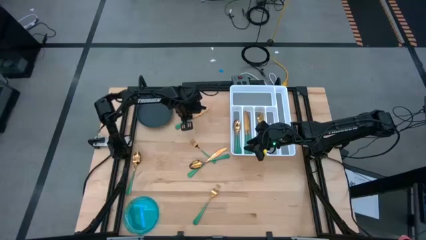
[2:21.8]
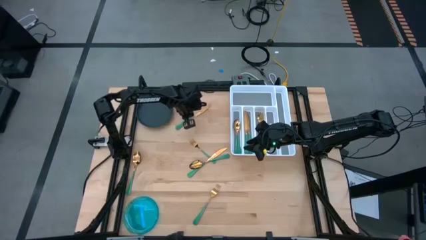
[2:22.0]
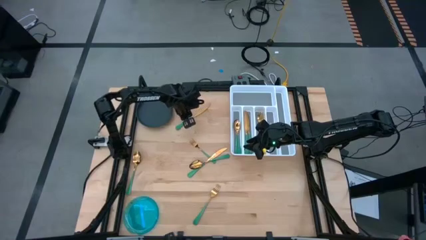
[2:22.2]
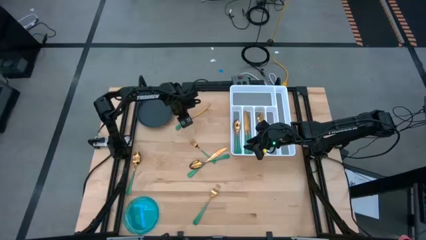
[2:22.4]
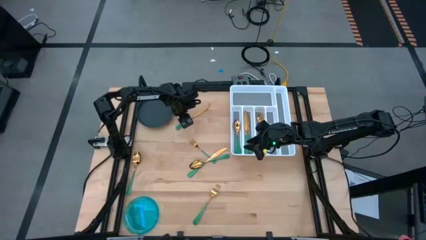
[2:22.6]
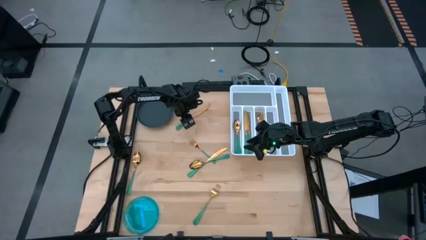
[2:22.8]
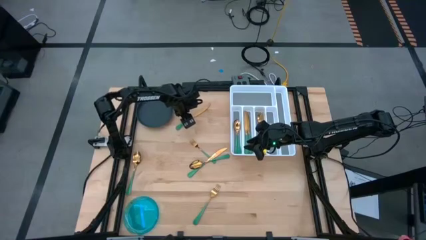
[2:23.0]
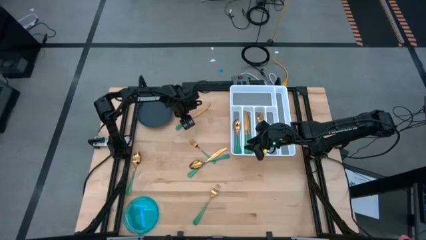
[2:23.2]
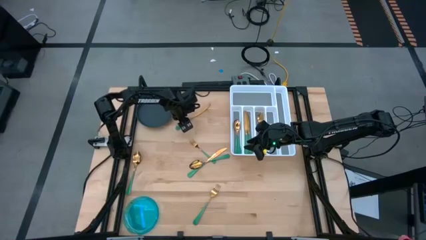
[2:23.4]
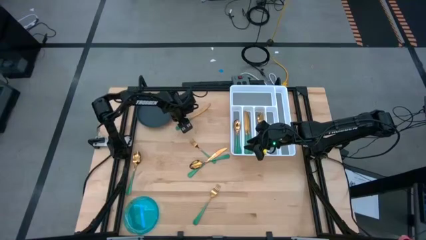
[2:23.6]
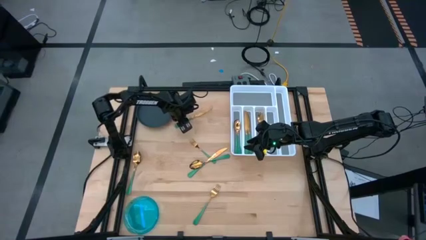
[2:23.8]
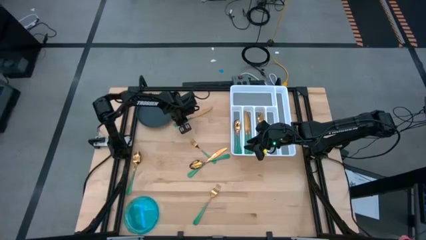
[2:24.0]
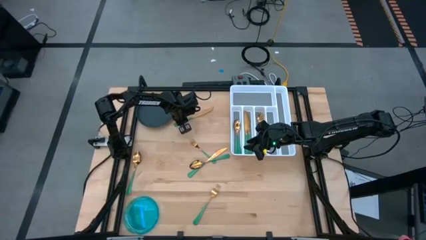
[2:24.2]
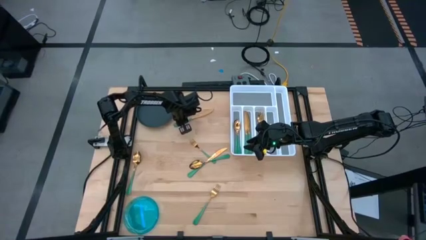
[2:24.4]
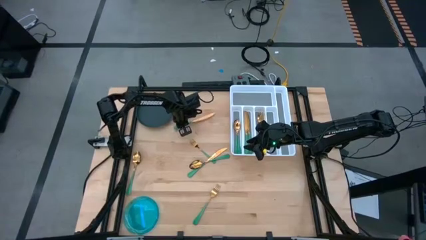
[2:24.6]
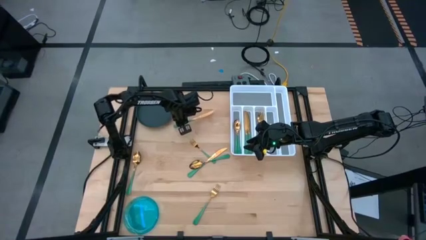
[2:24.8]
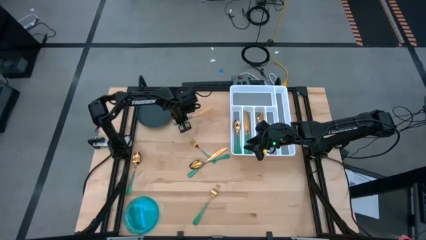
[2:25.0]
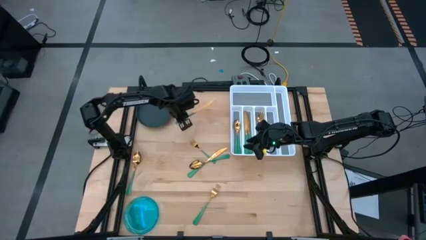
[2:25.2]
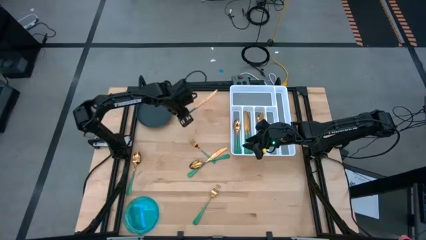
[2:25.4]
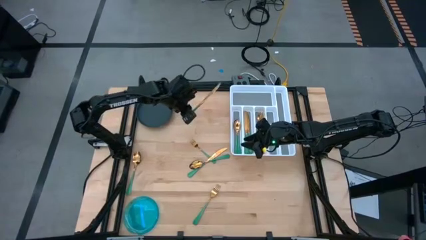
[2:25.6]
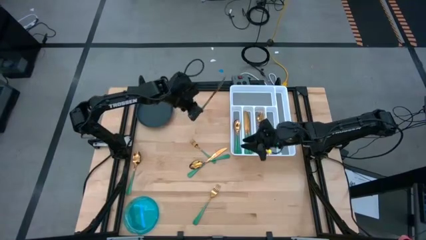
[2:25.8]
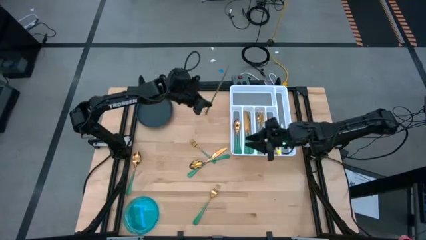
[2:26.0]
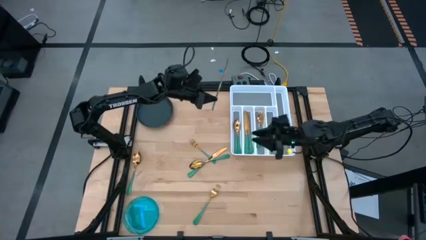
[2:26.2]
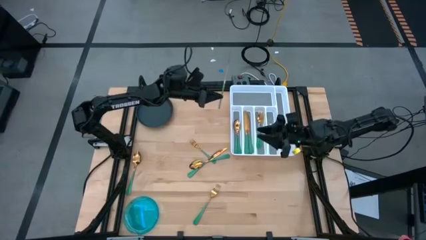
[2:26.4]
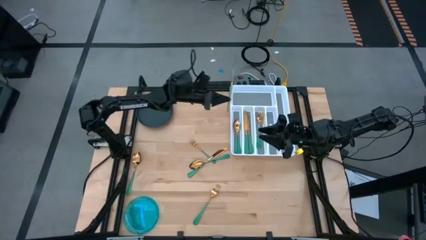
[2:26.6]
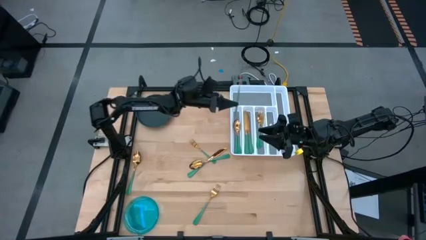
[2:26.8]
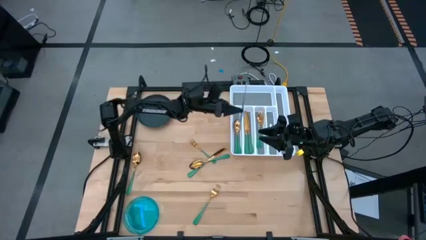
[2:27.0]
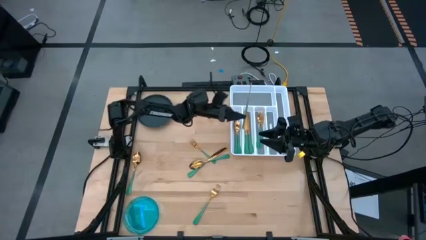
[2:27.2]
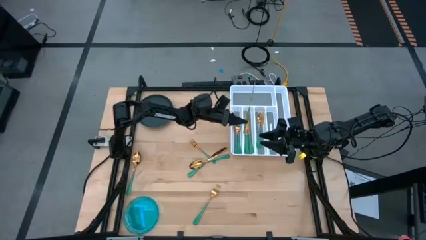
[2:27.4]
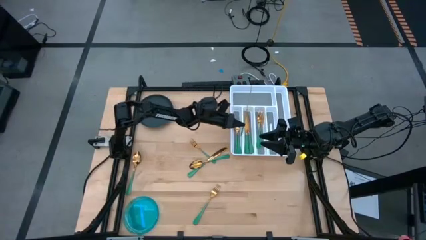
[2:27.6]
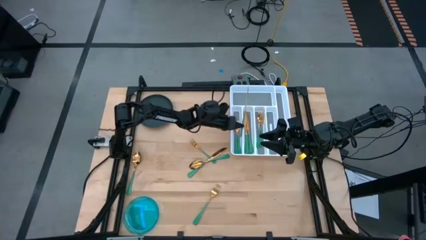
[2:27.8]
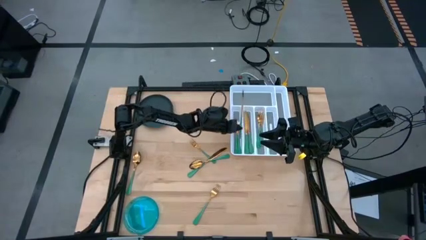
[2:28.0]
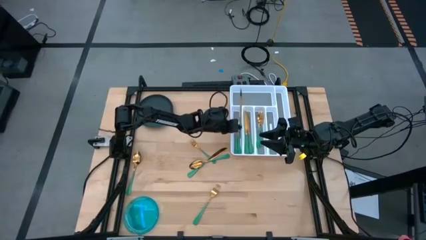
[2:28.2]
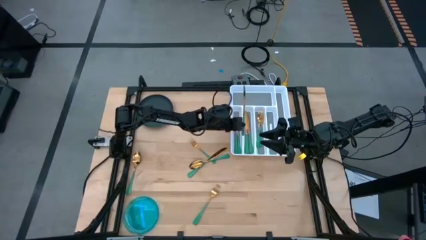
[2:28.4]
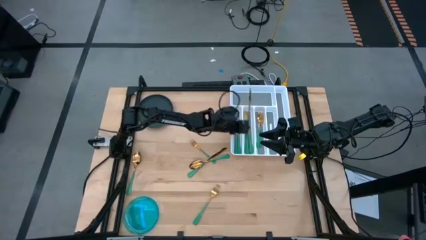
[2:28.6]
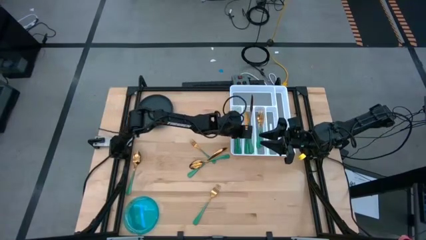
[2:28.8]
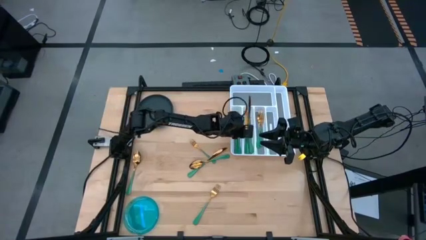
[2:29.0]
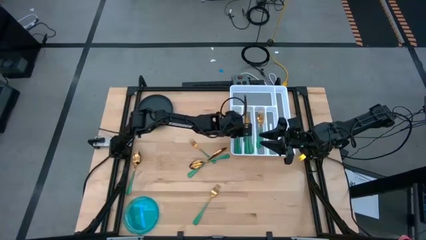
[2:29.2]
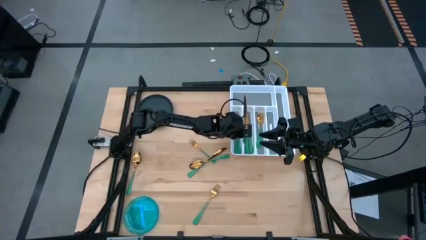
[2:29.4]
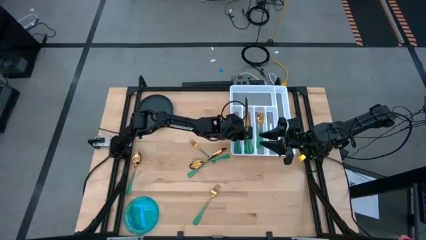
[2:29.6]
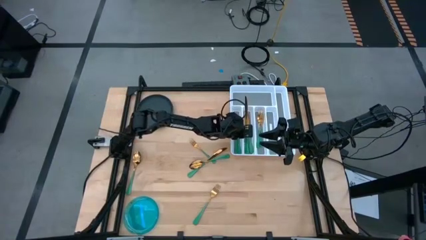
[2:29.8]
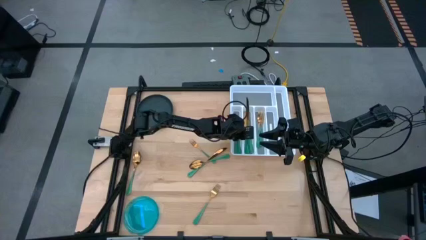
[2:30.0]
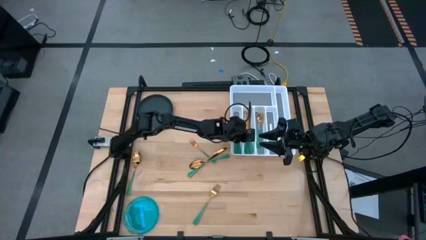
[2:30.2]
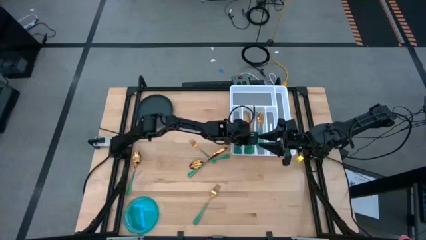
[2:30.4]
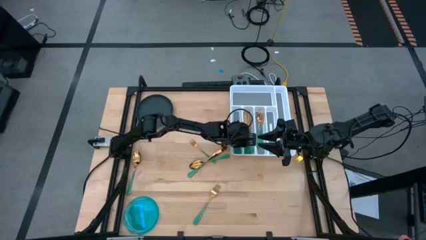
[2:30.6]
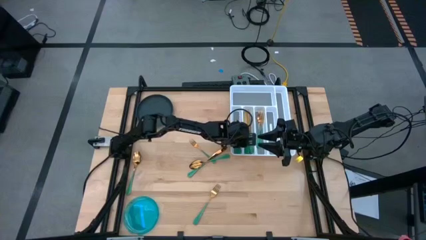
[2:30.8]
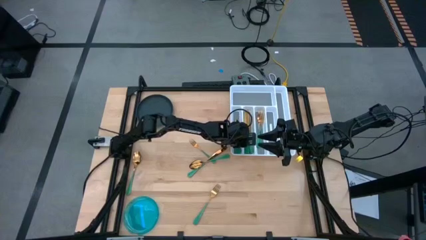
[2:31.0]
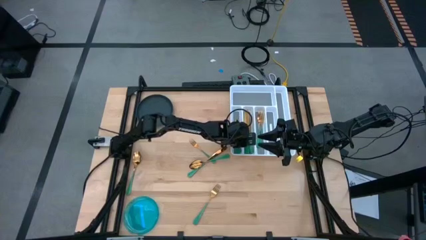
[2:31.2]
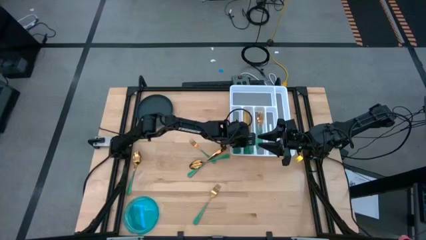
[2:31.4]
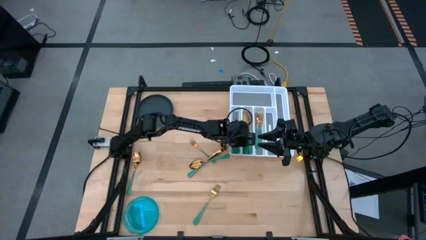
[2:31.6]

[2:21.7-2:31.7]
Task: Sort silverware
Put the green knife on the silverware organizer

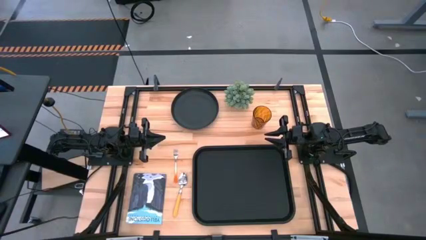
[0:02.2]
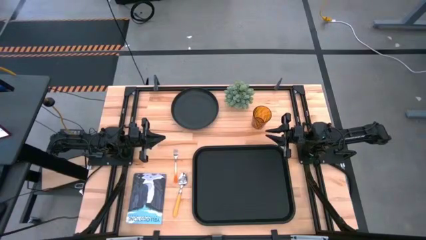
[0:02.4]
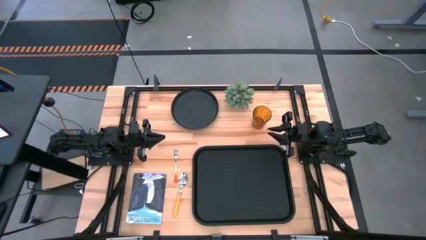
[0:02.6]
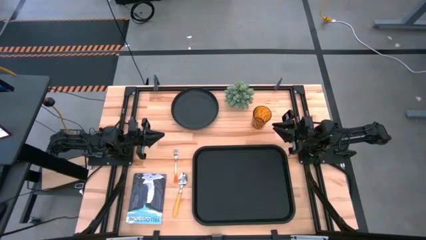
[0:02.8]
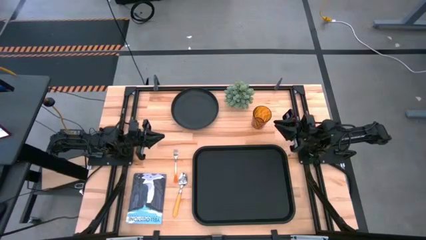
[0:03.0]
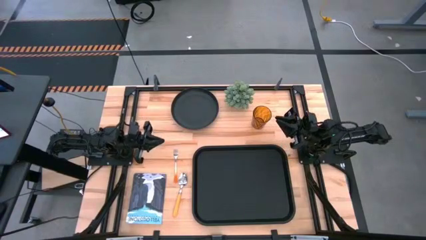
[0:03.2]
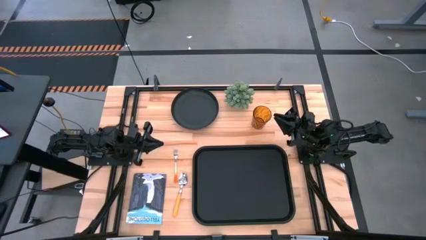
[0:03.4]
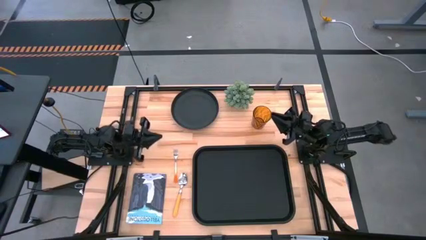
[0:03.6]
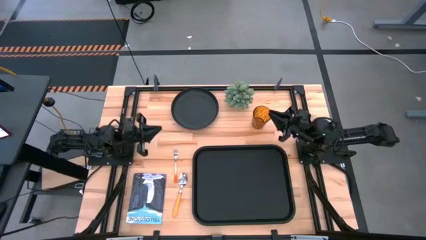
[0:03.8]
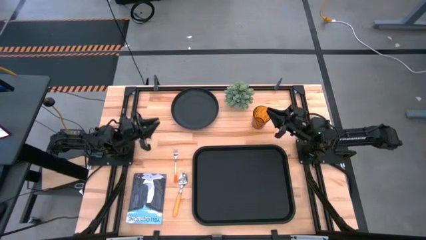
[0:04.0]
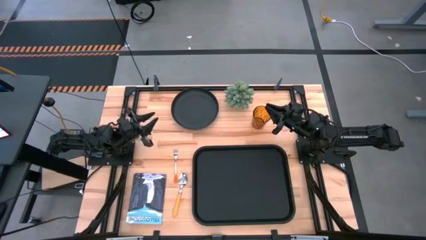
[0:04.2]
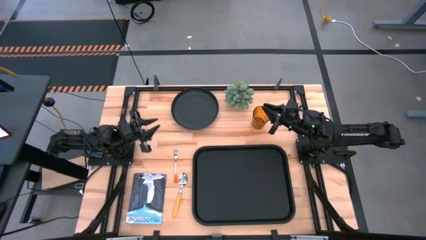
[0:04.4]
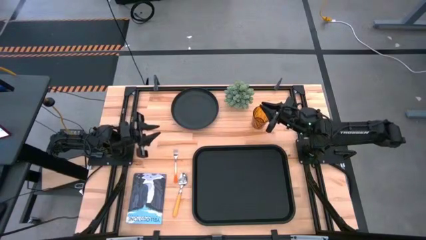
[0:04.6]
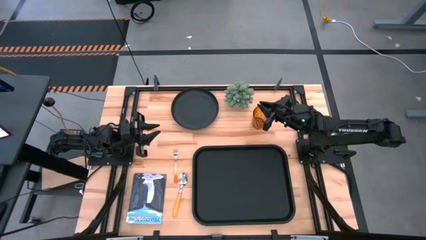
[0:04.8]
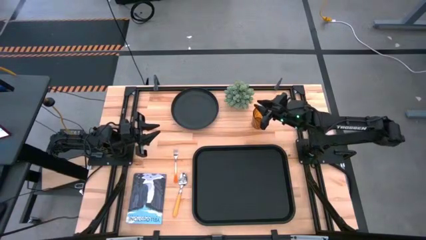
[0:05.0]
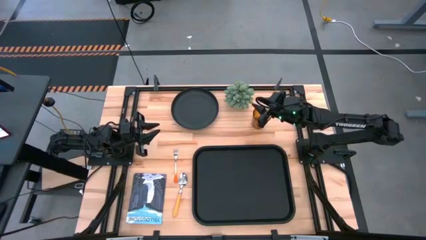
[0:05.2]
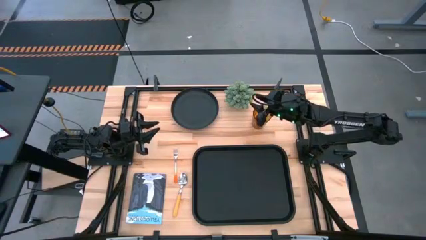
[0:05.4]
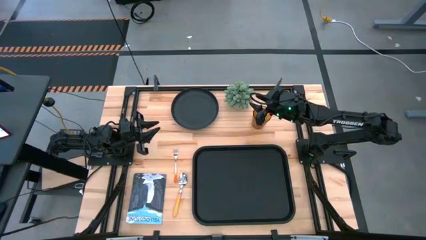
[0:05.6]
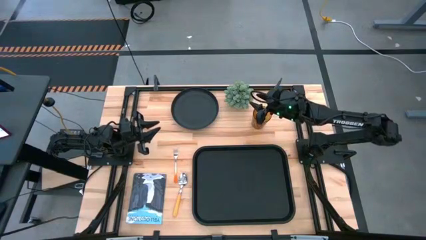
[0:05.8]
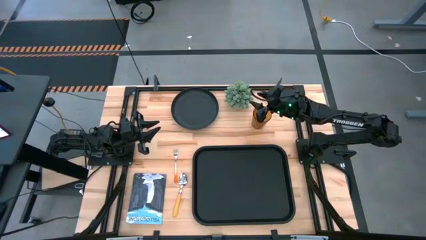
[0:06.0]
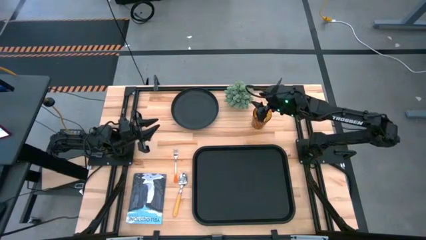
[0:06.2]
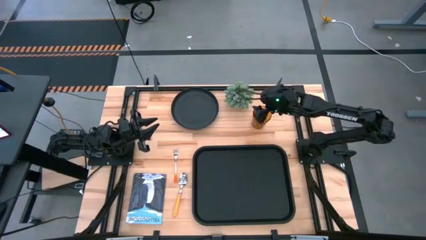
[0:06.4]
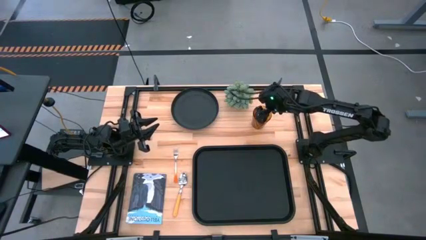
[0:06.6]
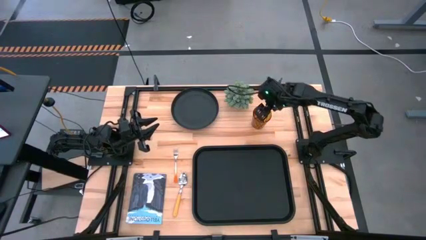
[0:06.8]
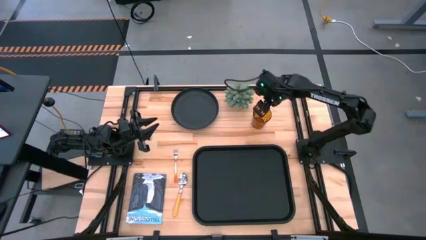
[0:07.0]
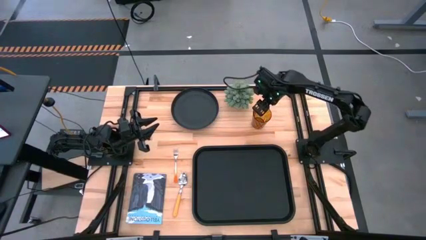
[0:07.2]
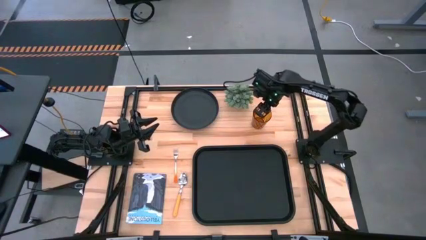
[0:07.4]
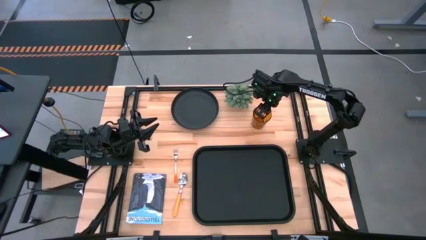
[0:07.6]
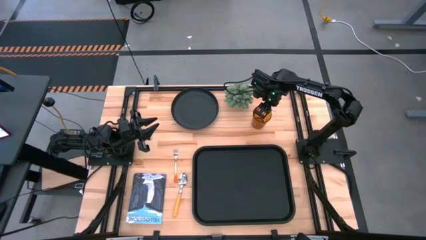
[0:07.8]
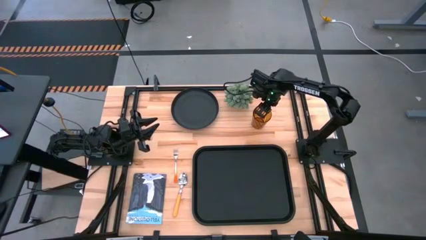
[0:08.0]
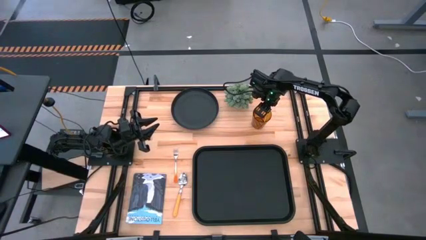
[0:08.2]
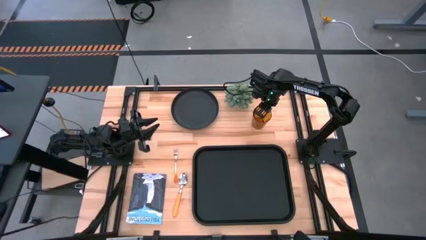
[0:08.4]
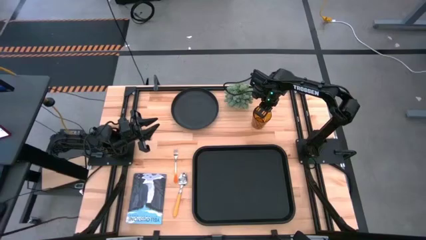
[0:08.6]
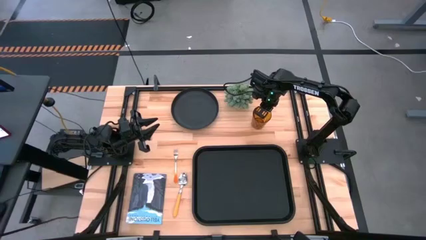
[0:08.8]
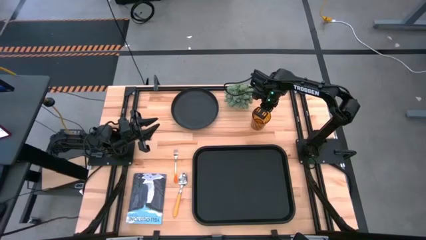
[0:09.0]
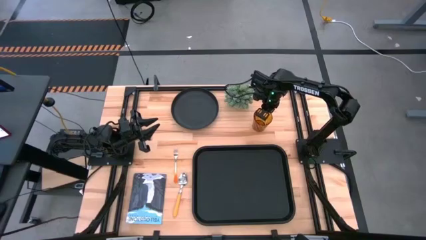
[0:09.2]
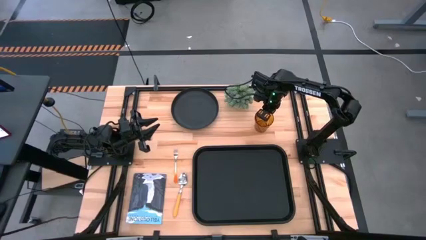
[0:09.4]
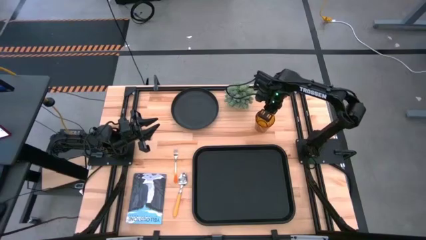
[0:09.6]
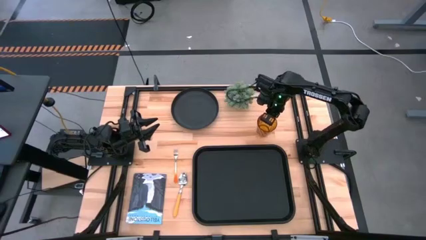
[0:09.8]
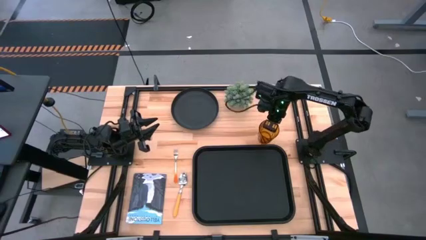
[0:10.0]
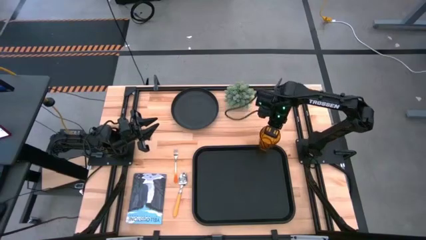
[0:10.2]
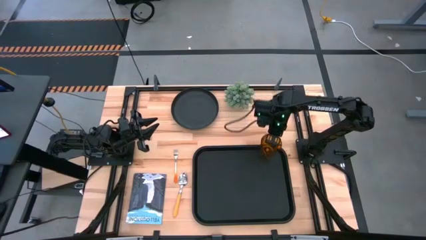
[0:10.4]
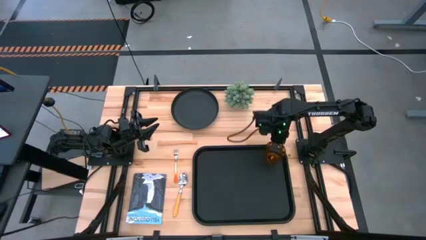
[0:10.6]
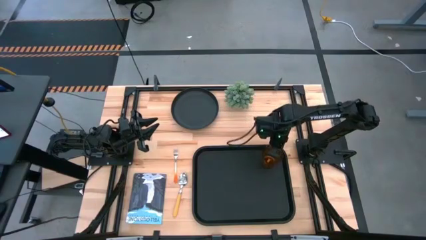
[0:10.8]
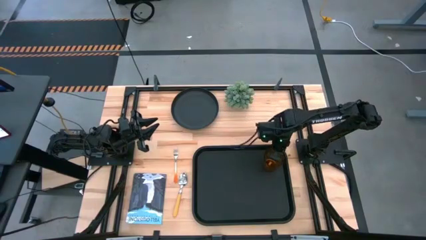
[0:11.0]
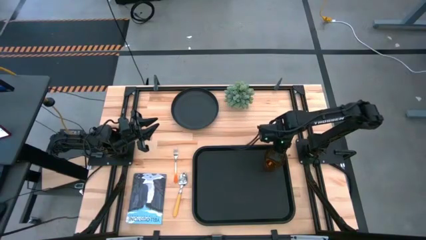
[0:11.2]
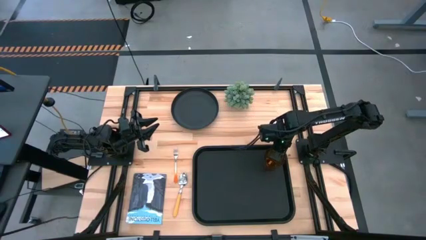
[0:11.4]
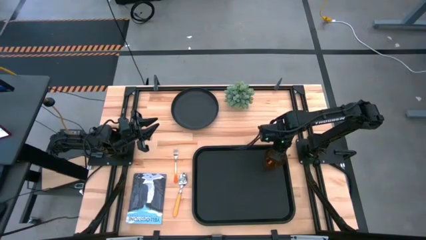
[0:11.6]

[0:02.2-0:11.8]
Task: Pick and place plate/cup/fork/spoon on tray
Put the orange cup on the top right of the black tray
